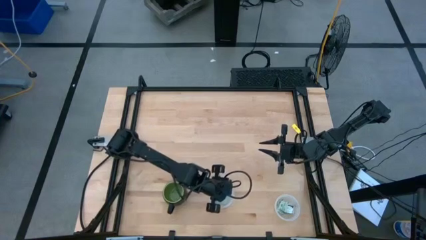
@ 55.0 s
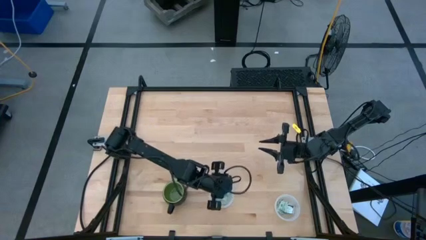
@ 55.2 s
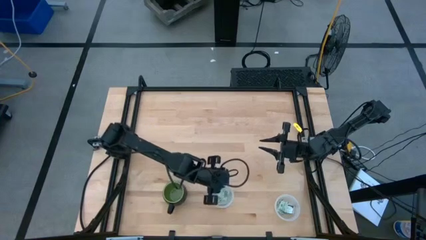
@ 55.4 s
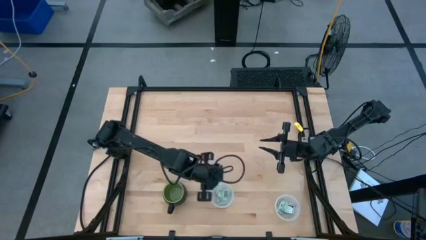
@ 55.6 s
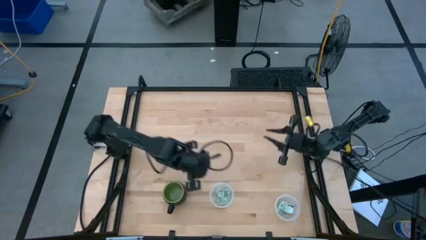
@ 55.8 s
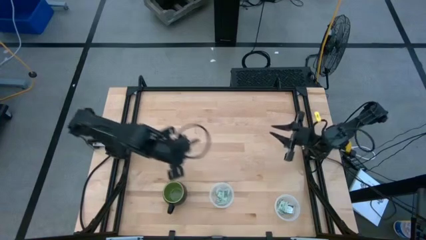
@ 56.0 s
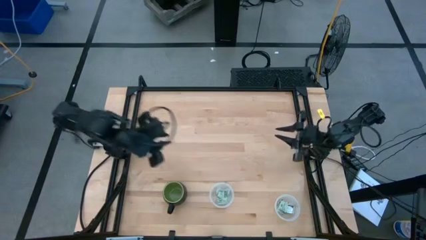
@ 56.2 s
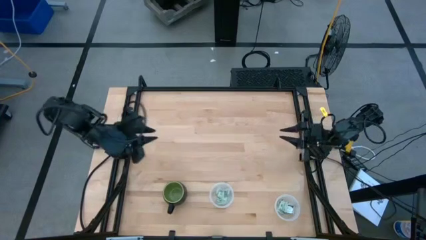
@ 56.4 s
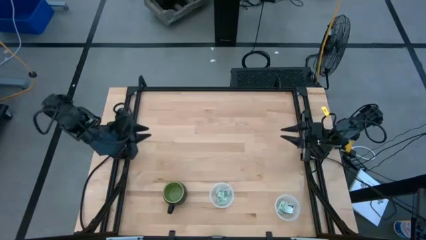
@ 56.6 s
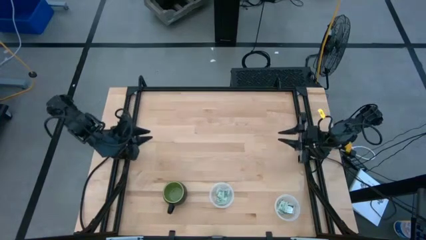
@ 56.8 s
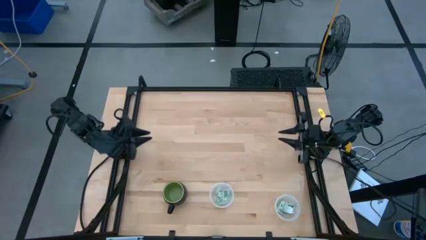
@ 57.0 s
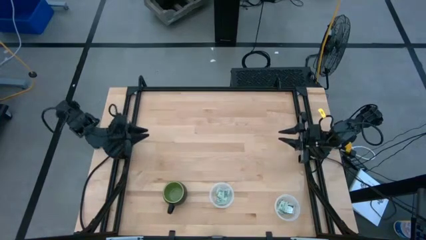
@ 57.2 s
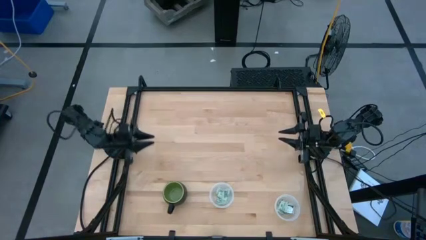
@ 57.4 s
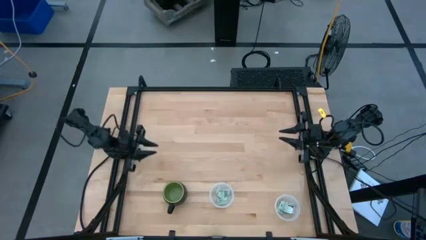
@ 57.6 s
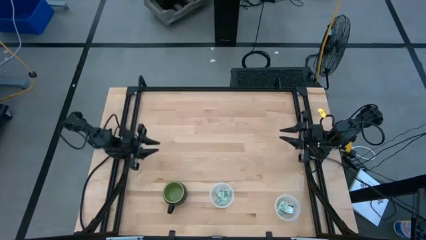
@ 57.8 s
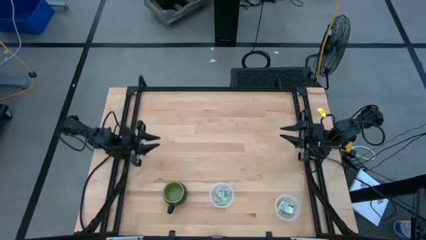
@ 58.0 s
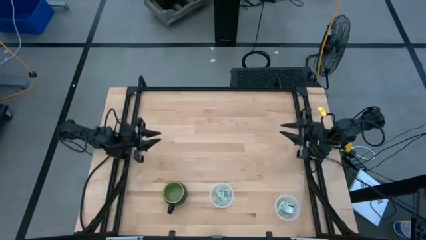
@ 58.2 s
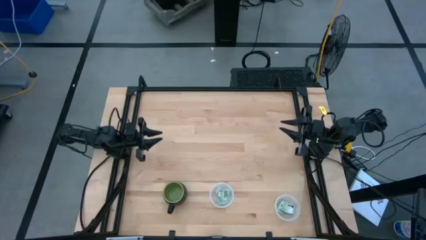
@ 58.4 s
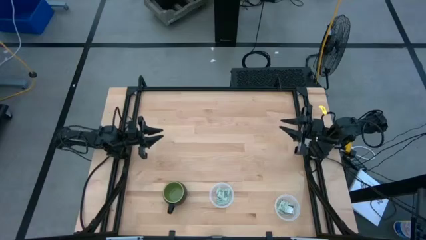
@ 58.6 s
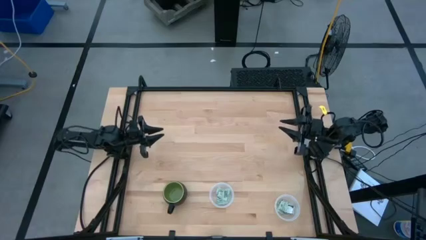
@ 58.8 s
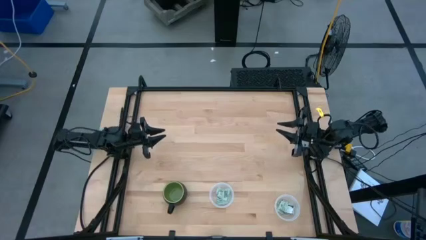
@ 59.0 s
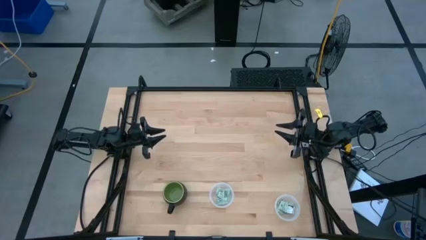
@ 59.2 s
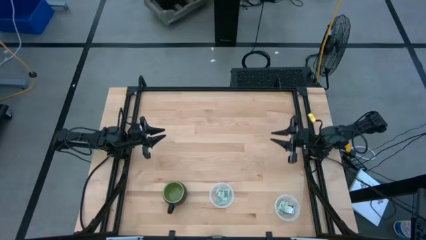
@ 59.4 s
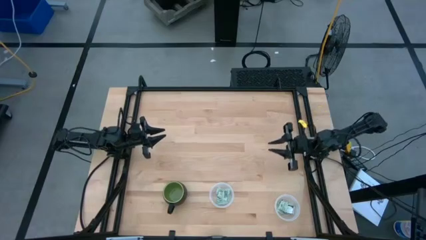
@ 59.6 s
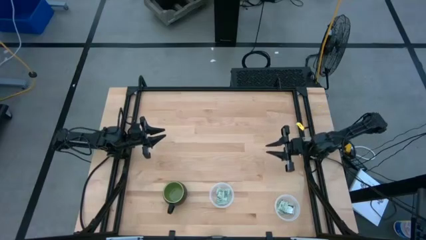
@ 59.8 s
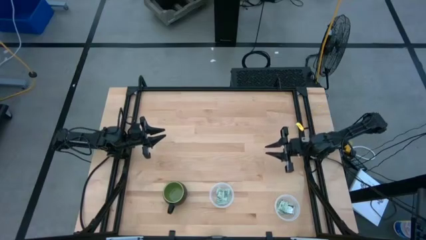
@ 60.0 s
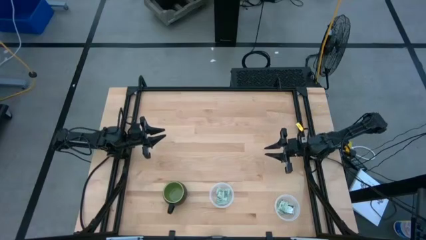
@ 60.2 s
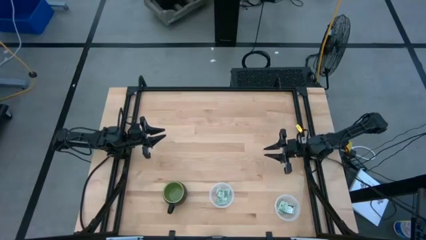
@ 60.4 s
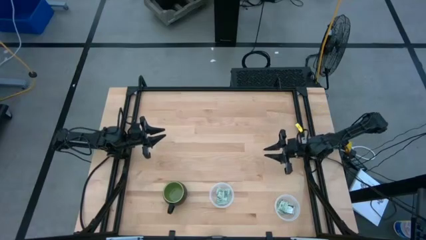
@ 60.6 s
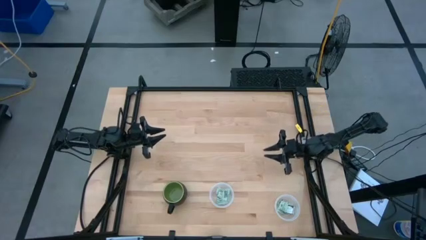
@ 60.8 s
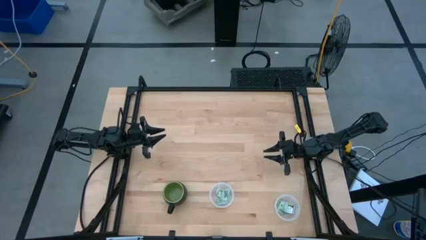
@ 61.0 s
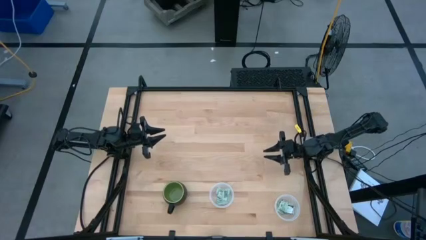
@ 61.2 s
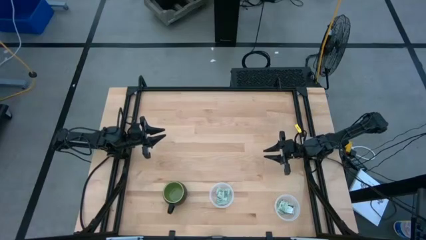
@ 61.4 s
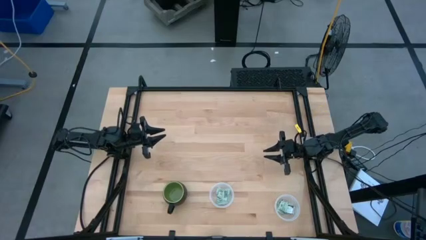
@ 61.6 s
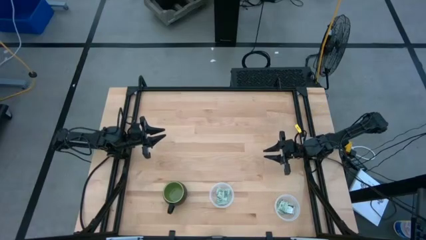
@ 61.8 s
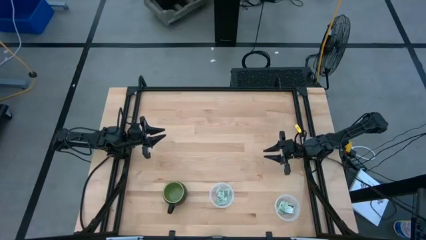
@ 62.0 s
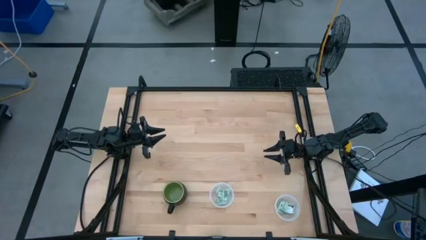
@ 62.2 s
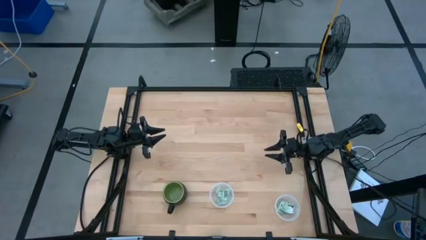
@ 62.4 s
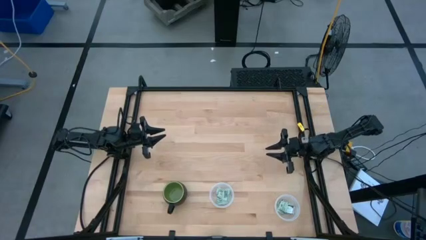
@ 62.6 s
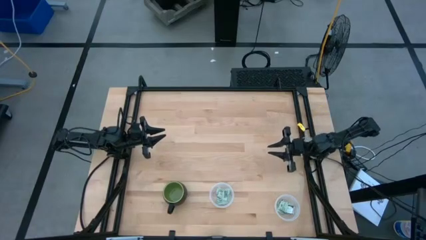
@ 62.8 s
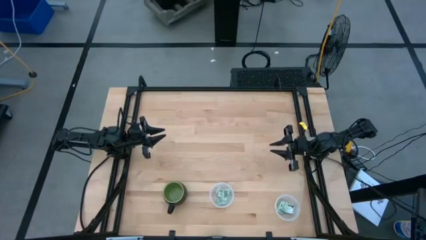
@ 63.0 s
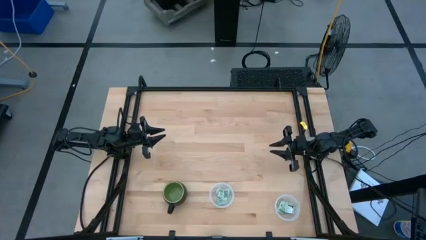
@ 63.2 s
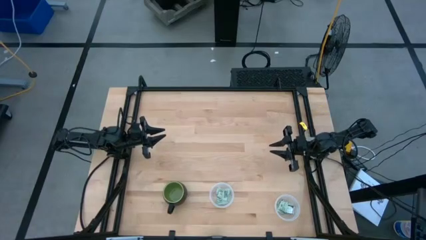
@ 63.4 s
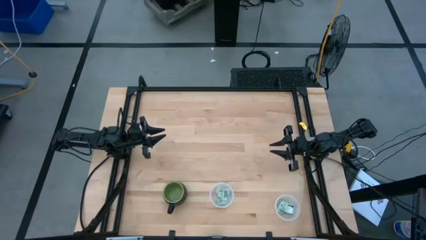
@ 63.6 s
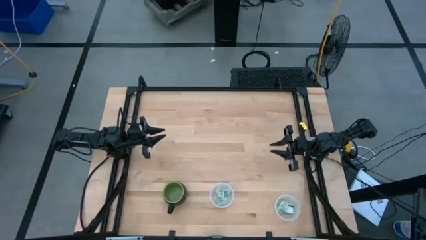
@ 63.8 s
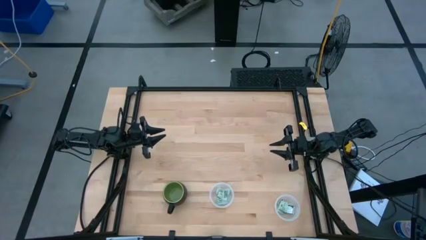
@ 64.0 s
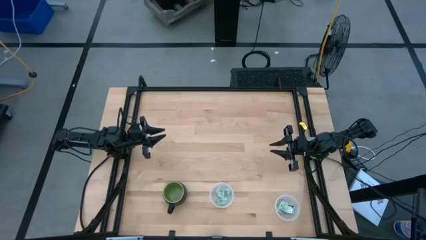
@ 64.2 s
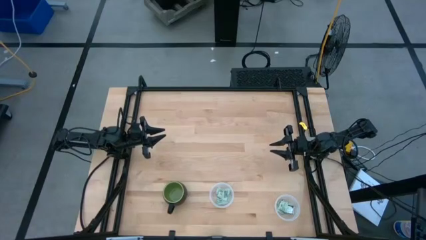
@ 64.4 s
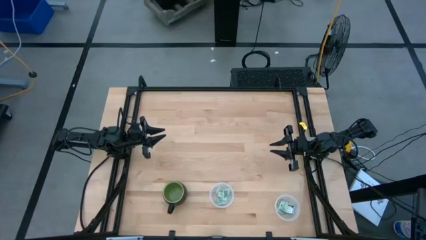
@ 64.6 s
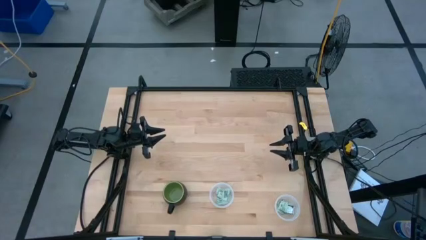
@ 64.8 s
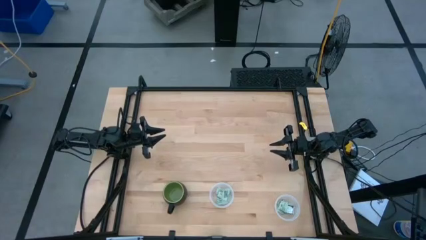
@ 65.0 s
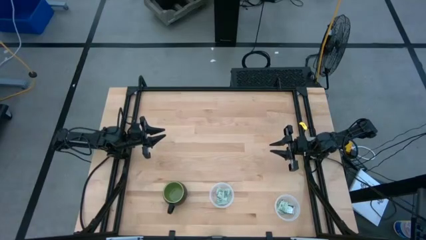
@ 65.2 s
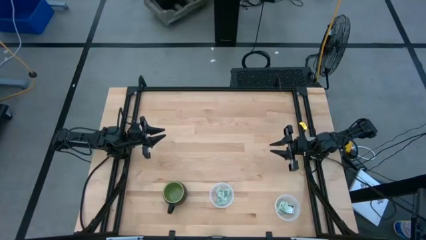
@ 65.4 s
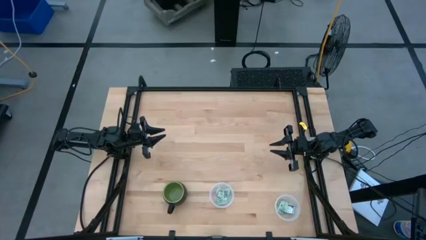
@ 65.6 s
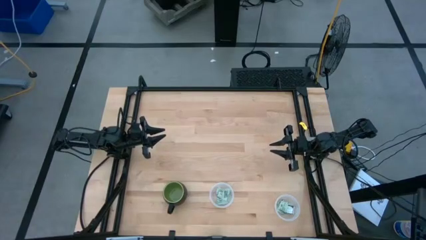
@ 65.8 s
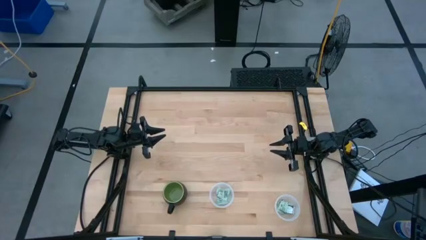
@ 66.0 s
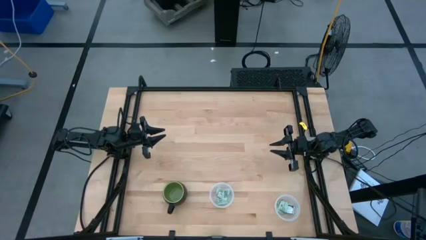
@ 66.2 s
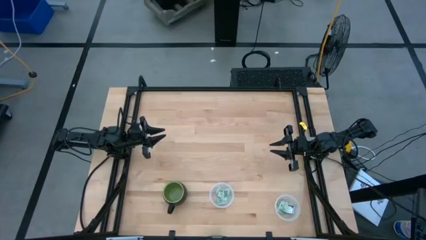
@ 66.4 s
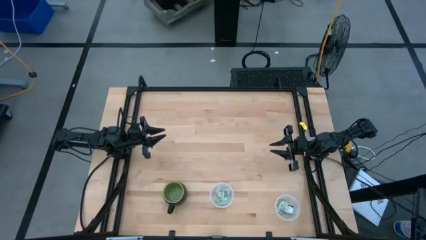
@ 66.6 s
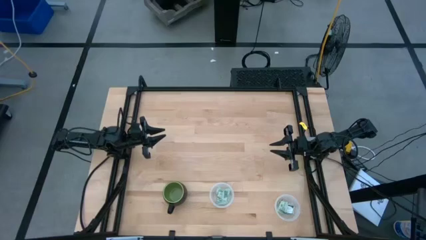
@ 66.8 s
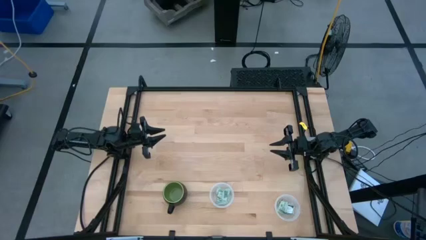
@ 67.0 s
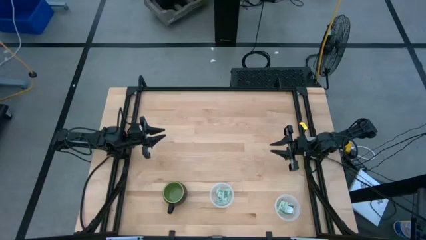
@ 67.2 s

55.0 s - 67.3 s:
Task: Pick and place Stevia / Truvia into bins
Return to Home Position

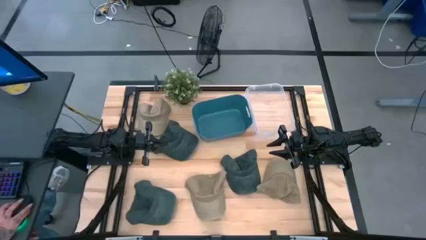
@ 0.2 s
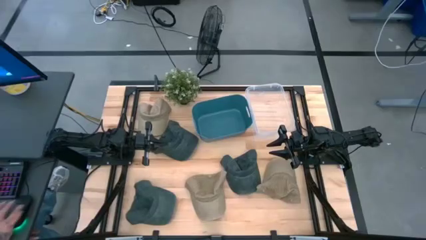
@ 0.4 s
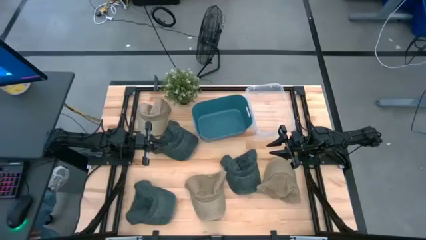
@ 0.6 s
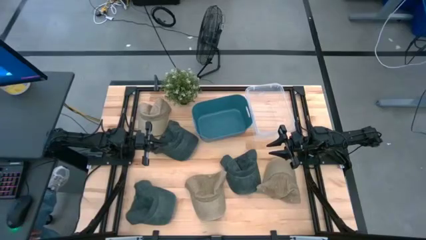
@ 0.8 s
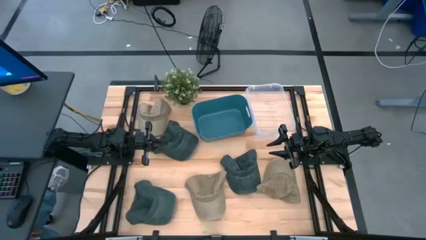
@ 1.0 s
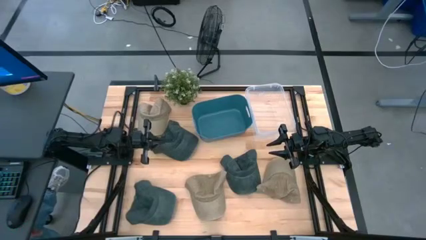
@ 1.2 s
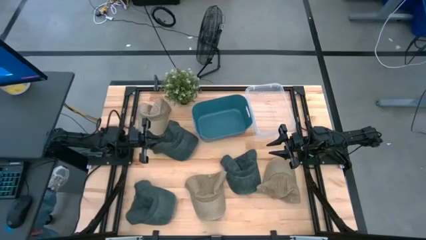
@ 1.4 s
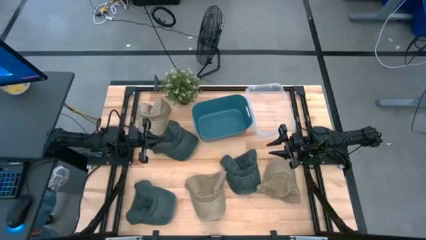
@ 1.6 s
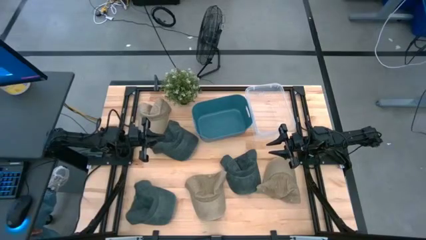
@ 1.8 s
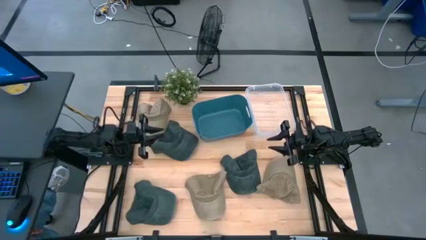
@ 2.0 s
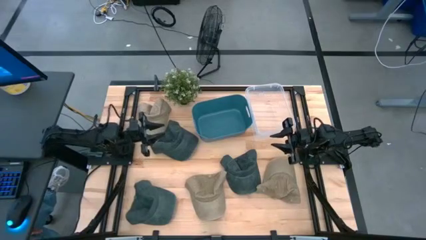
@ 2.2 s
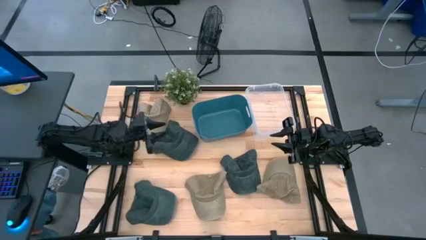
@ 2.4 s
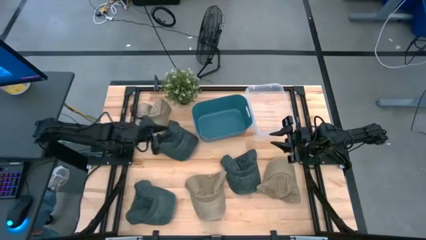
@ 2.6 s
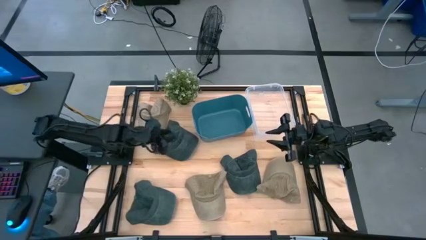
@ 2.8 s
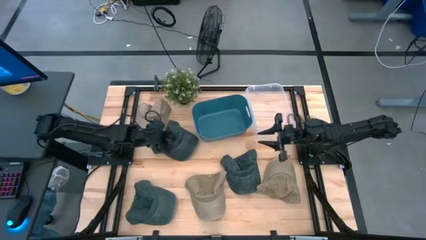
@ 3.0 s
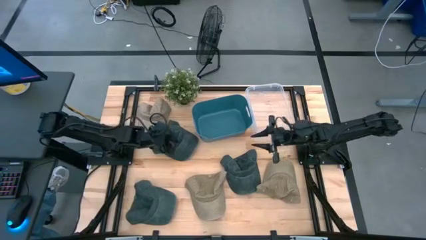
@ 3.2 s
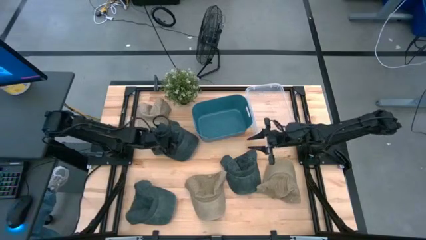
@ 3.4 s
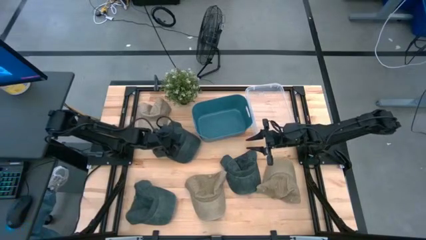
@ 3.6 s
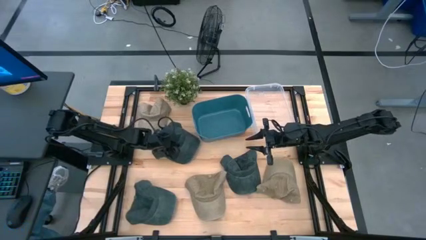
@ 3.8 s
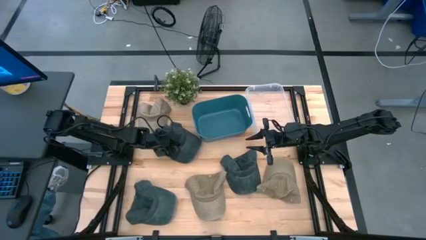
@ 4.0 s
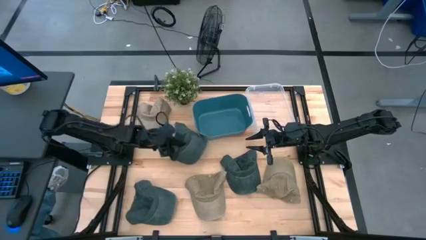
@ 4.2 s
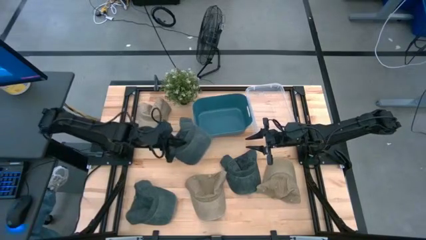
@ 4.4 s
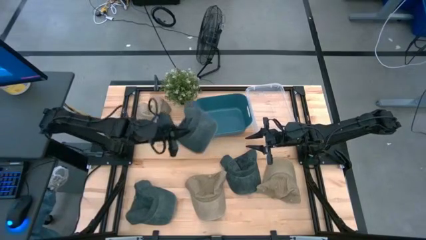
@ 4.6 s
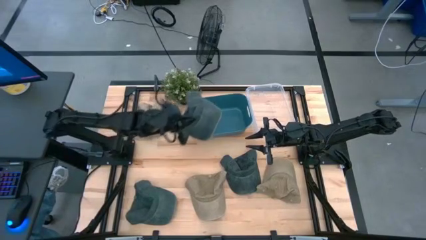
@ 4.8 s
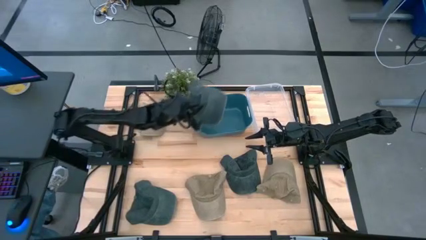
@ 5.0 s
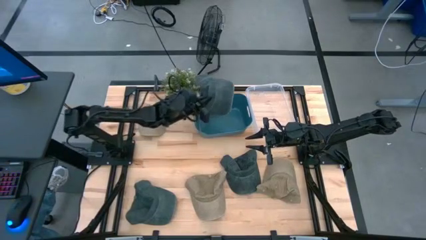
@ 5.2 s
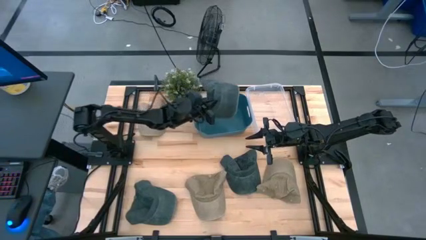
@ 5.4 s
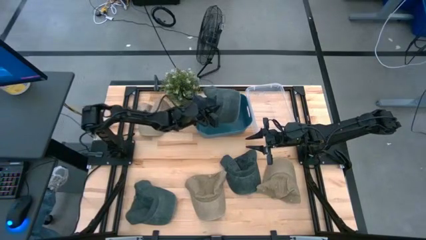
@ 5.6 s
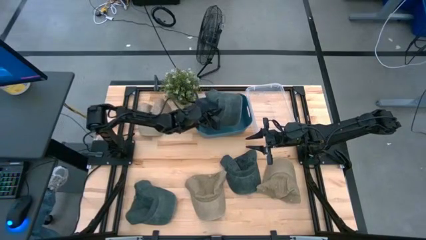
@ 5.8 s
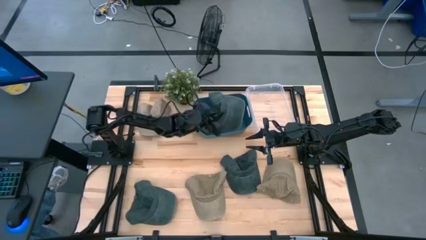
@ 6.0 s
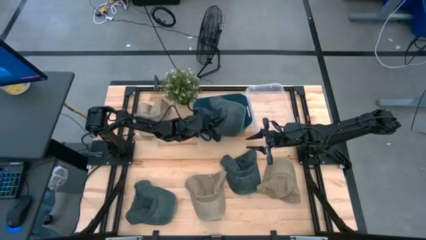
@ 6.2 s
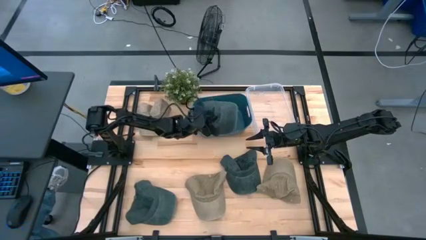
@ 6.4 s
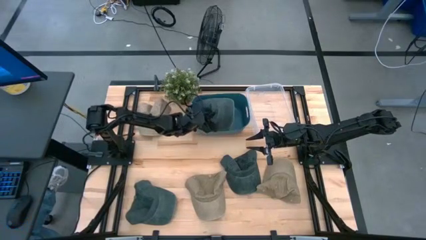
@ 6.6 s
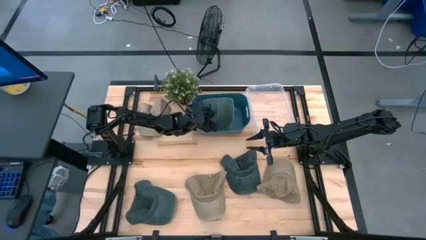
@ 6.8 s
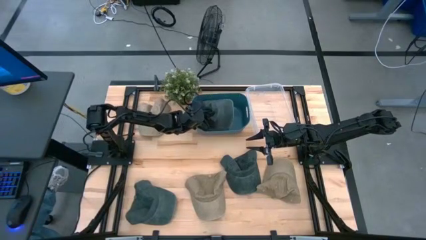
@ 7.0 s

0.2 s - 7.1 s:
Task: Pick & Place hat
Put the top dark blue cap into the blue bin
